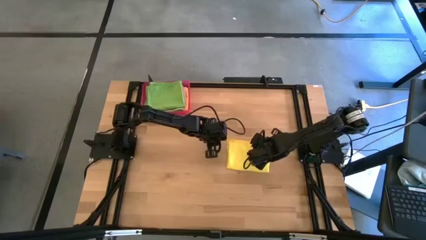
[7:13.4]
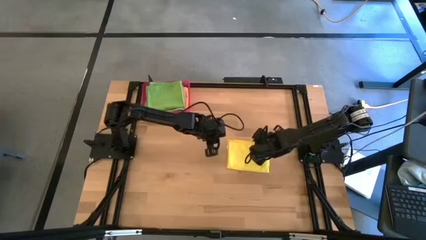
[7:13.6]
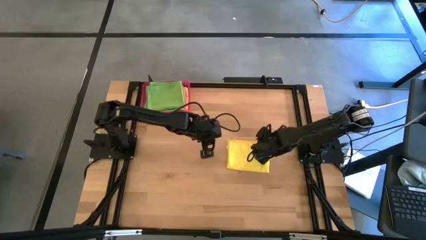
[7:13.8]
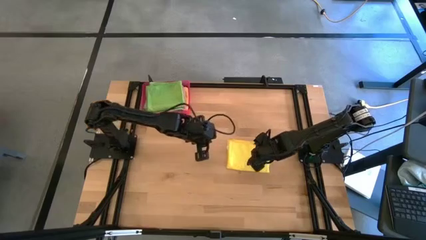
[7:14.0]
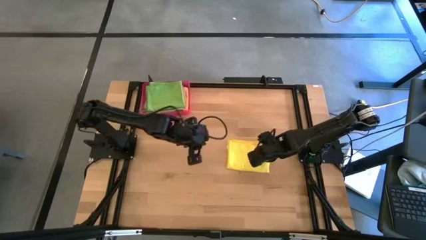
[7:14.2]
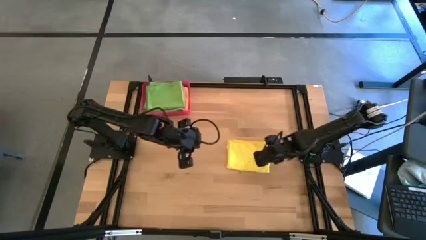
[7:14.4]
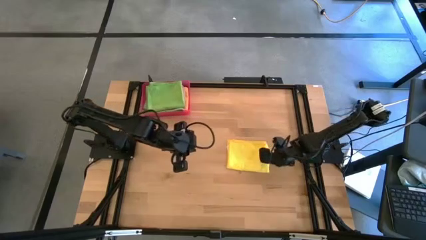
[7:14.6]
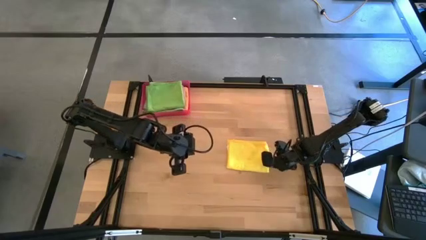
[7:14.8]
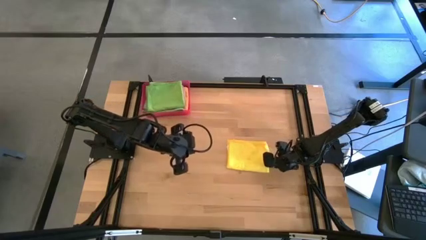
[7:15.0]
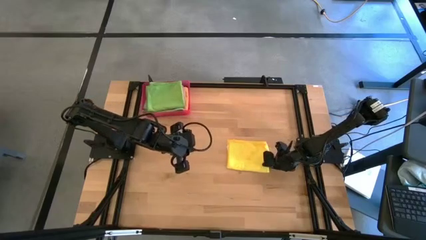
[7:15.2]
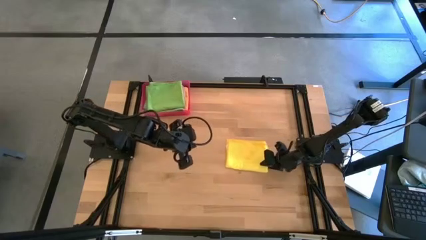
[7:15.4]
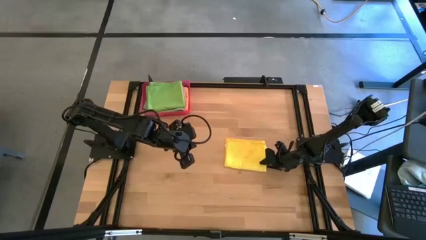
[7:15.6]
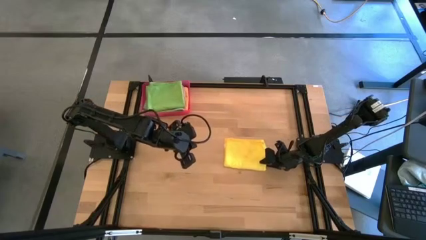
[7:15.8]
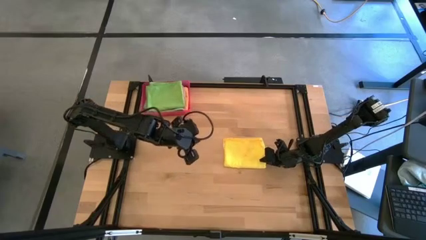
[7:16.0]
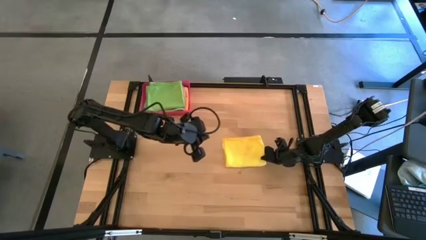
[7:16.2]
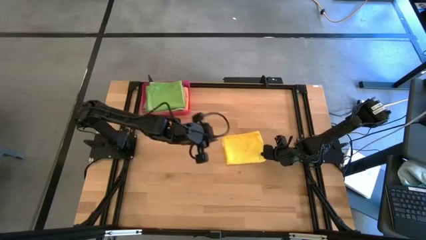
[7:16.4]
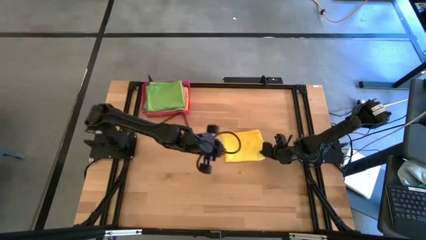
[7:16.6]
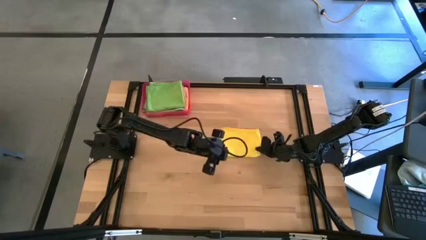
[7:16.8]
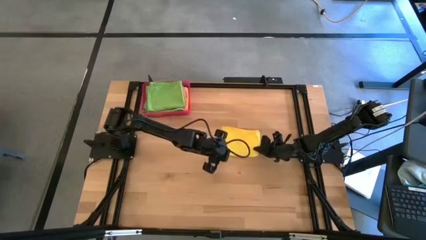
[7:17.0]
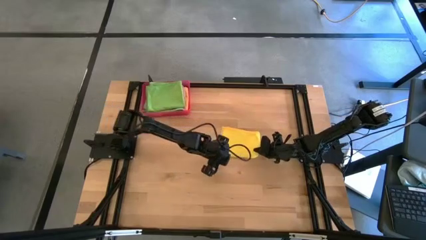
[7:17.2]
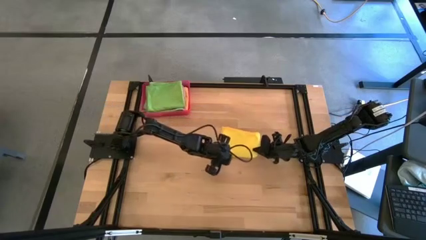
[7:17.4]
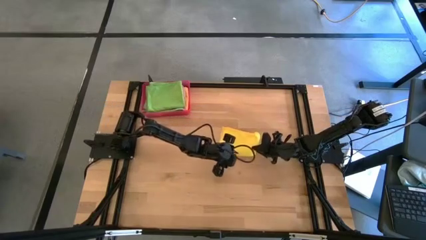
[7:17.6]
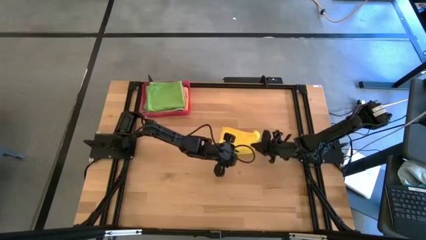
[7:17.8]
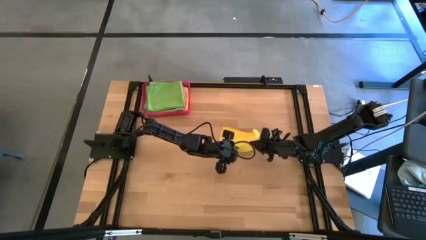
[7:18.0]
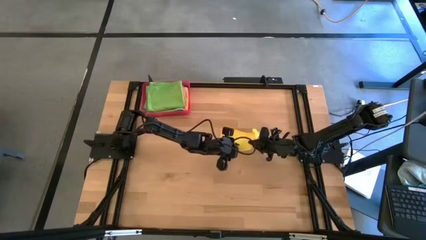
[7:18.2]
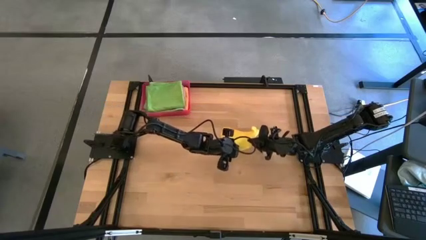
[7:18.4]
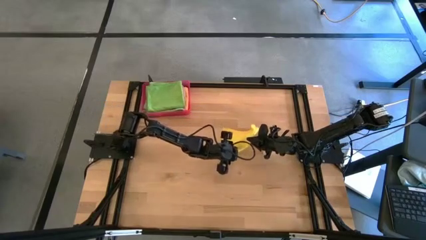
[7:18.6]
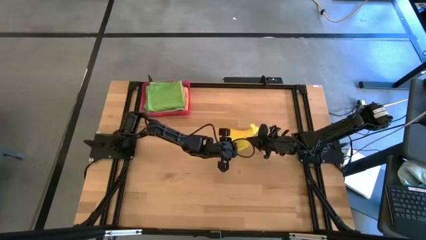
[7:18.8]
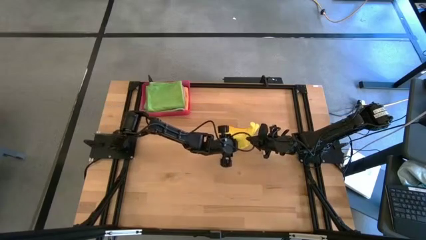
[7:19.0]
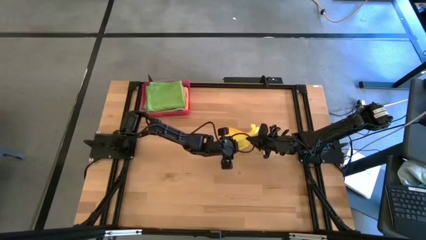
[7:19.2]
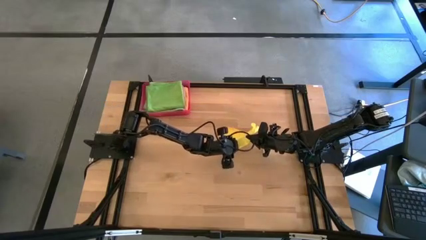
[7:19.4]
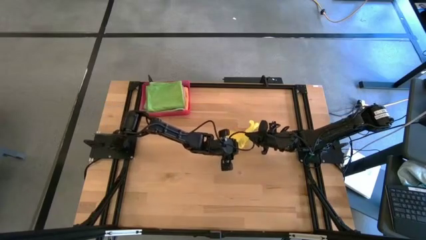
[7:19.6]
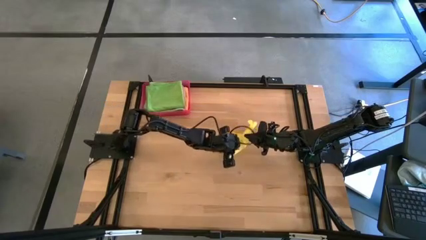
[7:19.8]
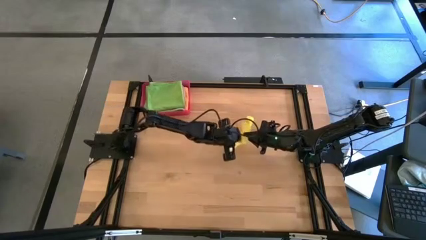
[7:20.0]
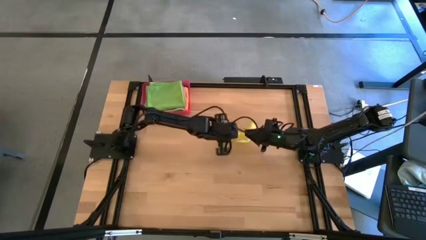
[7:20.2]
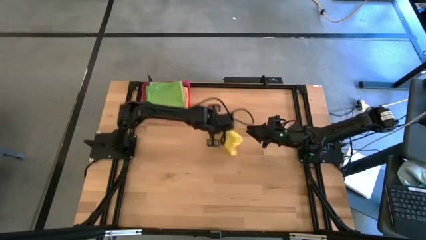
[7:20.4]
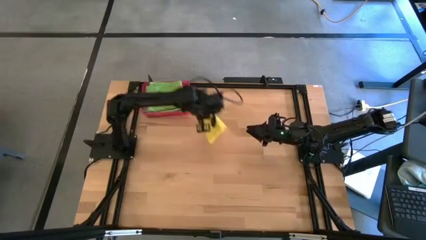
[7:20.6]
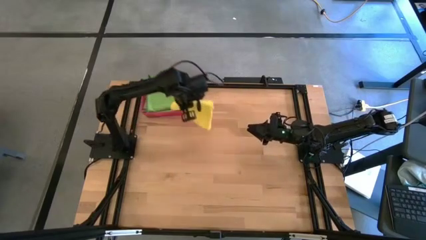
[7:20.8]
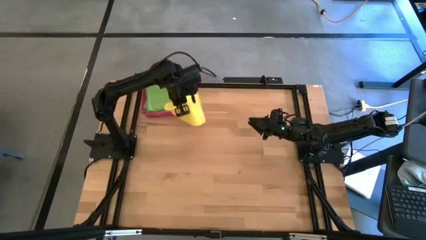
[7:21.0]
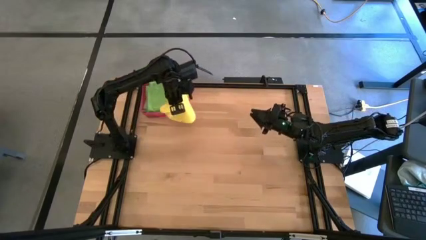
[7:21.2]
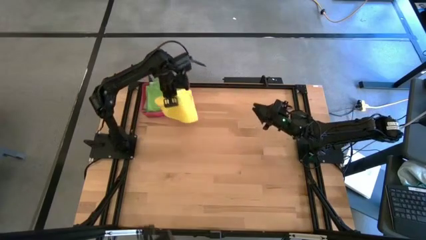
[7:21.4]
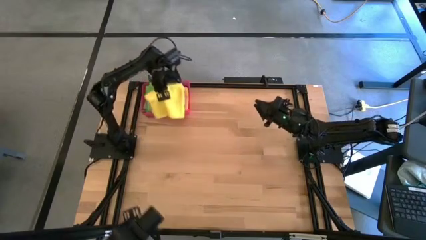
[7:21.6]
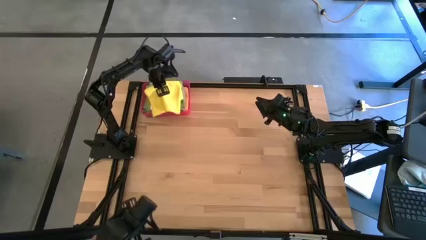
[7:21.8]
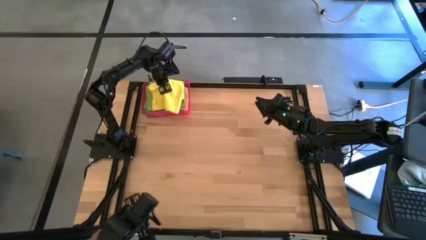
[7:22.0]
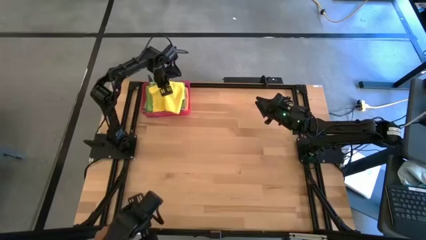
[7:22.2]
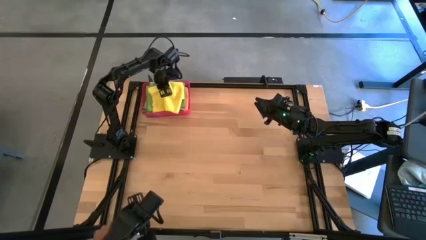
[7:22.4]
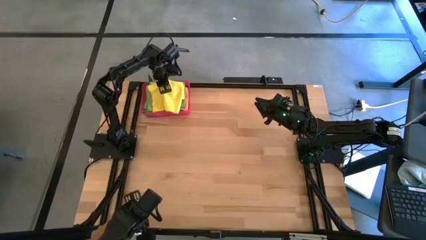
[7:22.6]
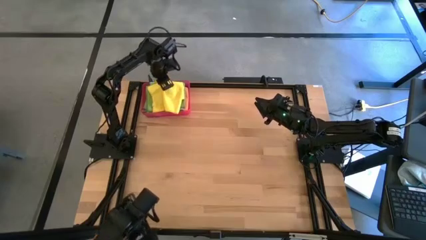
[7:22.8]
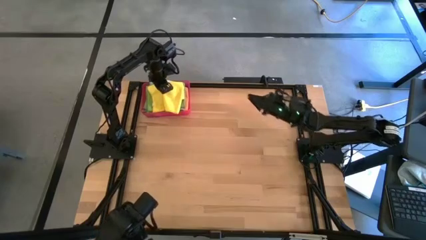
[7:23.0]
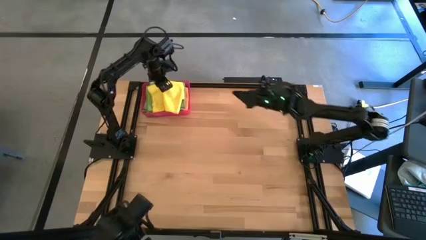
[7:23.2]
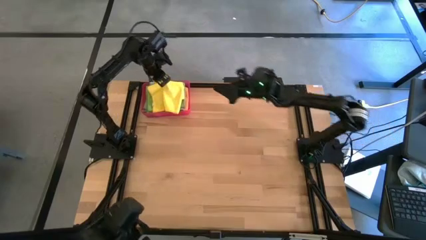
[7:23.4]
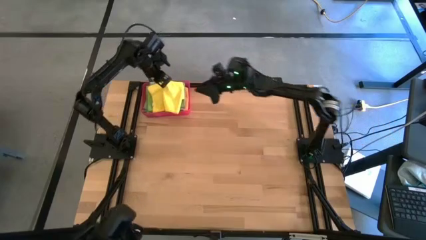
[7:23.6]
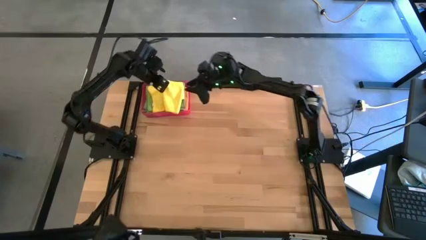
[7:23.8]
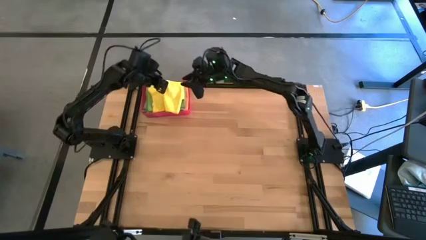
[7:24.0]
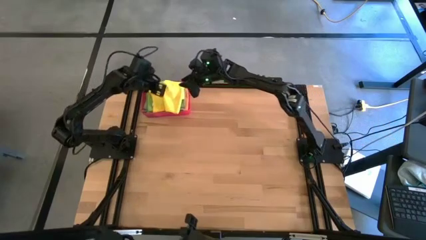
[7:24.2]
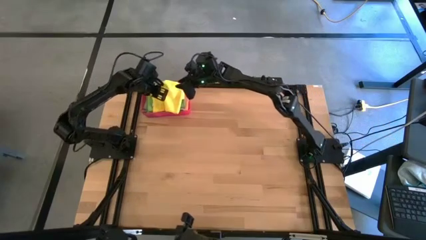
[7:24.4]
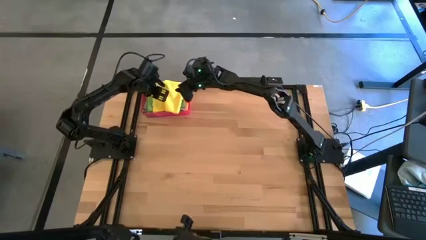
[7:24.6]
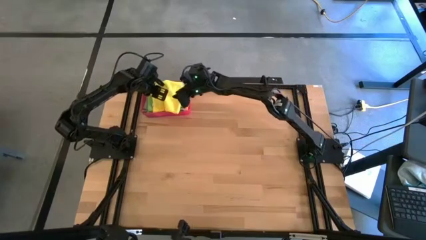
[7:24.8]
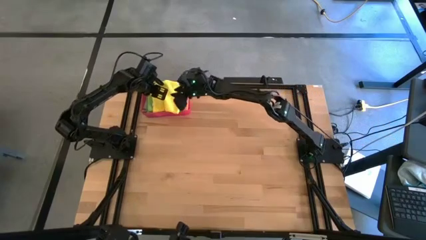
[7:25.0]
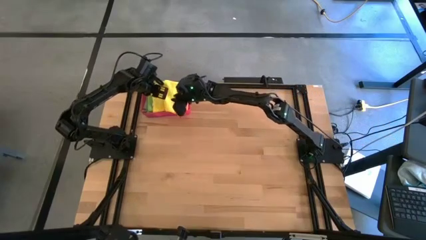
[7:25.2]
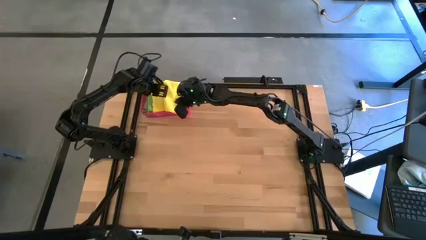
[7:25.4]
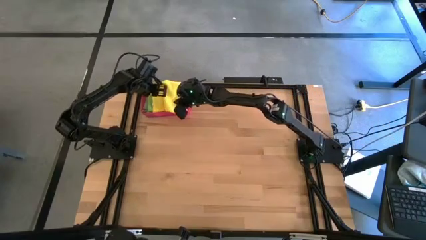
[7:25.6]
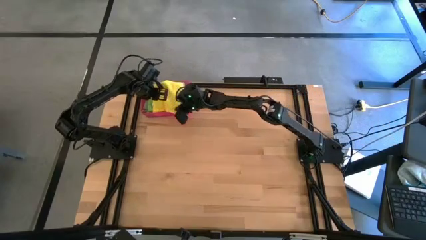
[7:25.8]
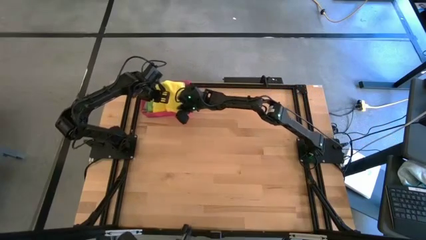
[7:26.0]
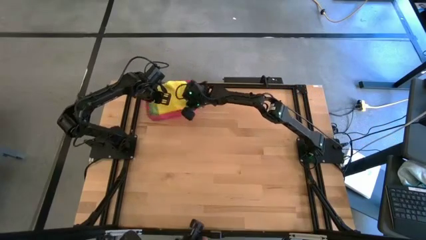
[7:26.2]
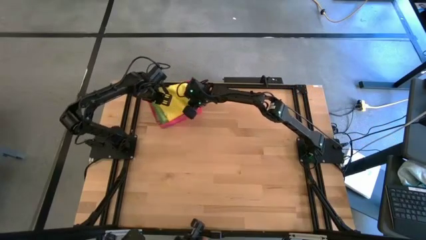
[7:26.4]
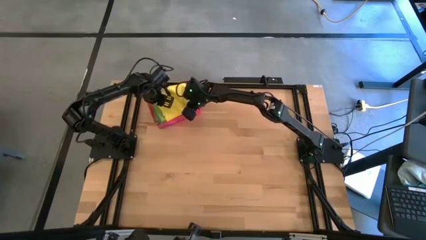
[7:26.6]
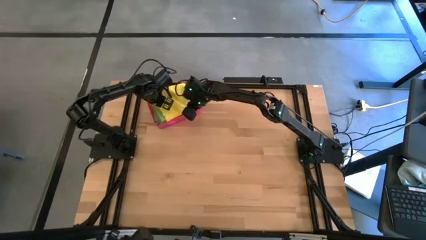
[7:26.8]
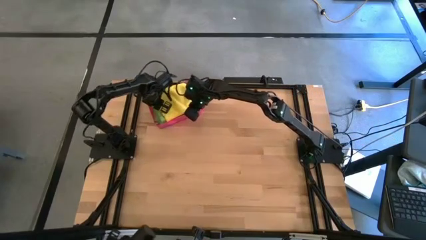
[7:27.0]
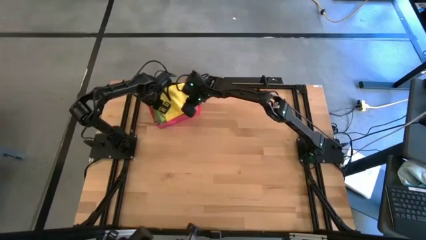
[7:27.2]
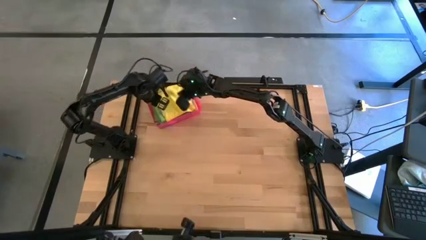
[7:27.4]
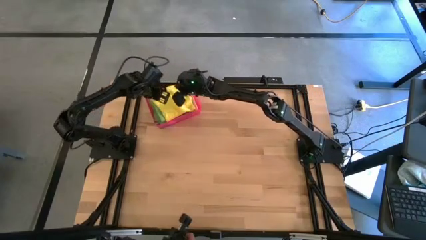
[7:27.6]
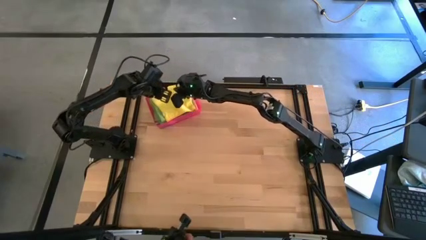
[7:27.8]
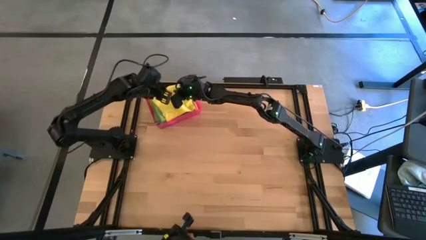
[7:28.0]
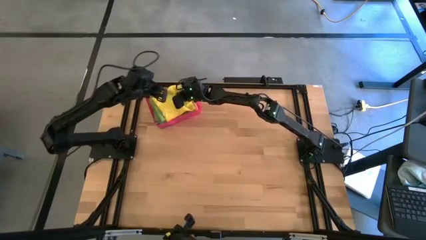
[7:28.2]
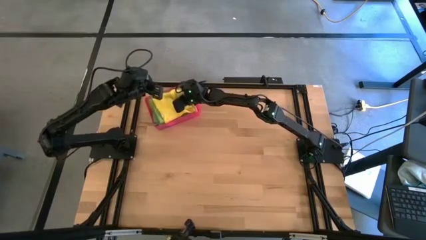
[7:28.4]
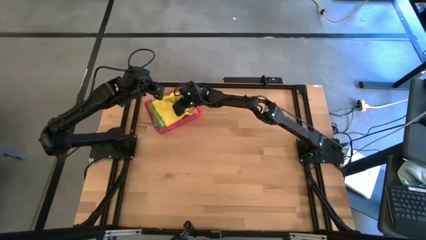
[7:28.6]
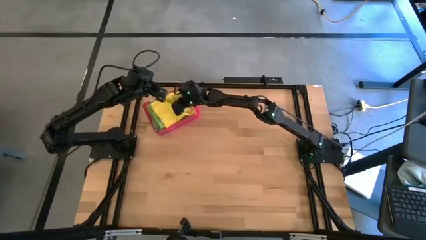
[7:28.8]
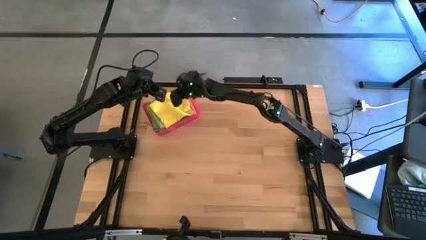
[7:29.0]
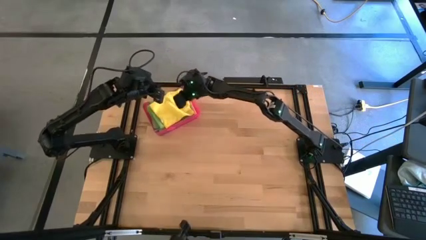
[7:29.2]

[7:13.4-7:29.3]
Task: Fold microfiber towels
Stack the folded yellow microfiber towel on top of the folded green microfiber towel in the pink bin

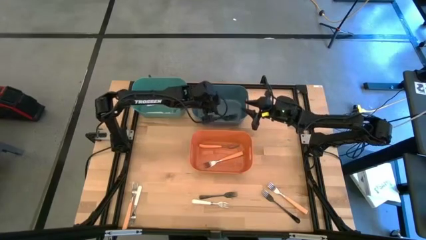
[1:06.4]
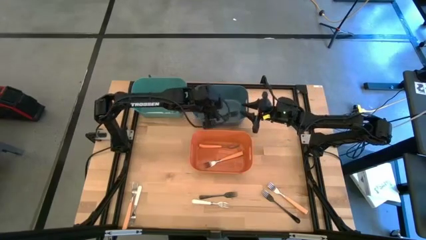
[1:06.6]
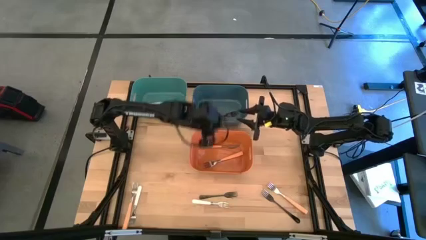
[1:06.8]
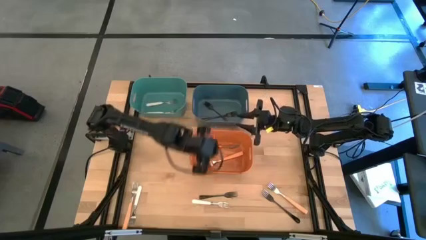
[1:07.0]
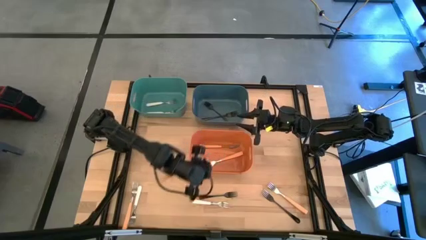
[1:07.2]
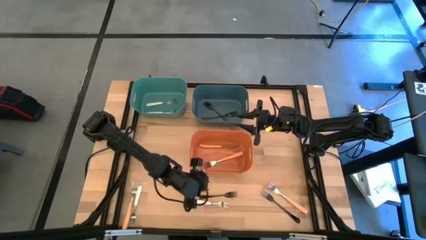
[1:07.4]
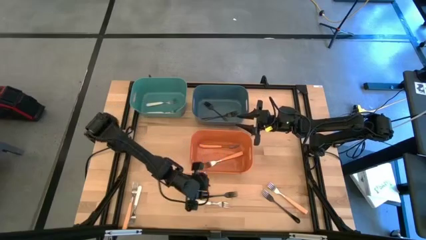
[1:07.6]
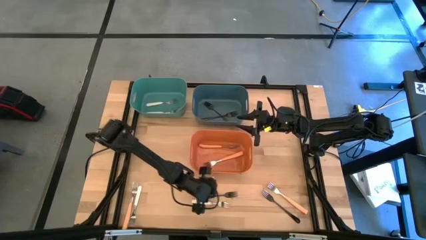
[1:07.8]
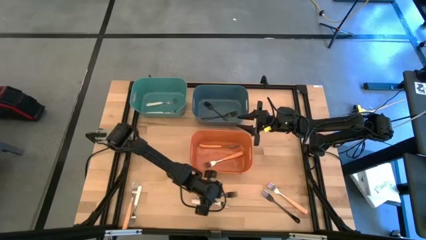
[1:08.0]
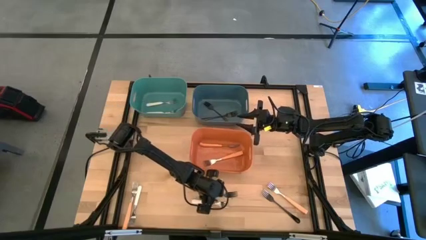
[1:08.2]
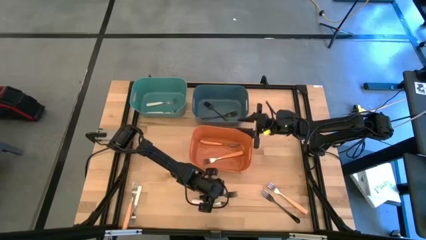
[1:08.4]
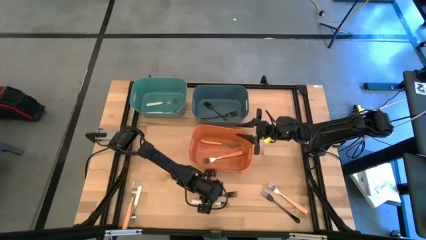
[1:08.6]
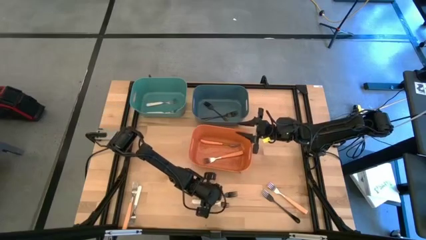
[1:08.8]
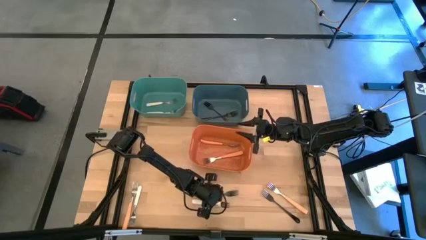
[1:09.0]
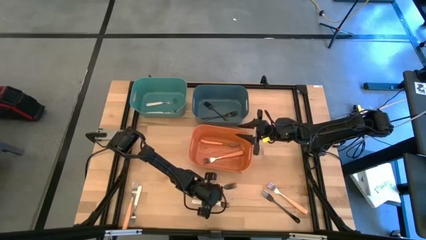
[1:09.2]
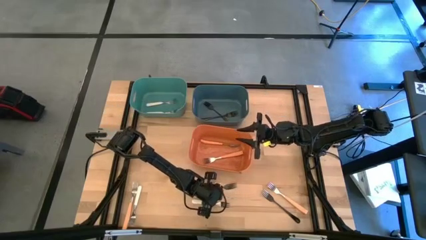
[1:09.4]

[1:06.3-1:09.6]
Task: Sort silverware by color (type)
Put the black fork into the blue bin
